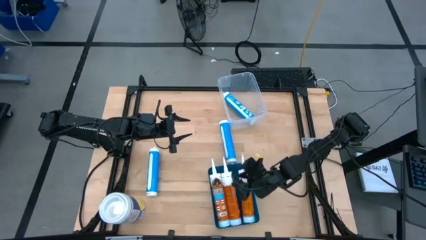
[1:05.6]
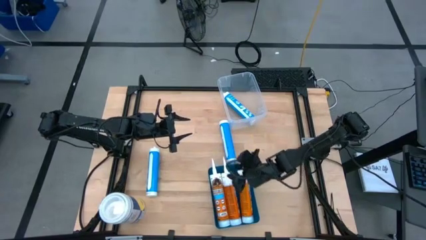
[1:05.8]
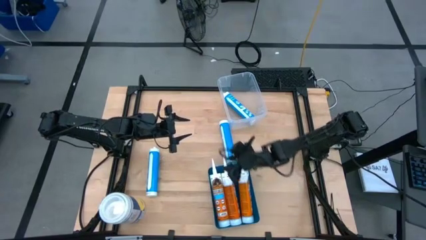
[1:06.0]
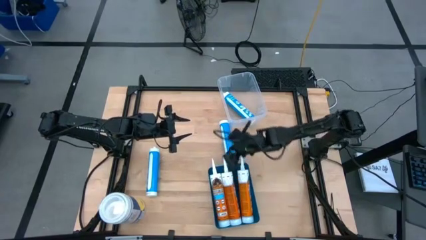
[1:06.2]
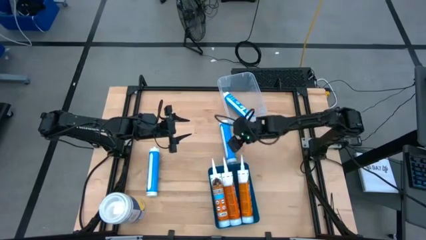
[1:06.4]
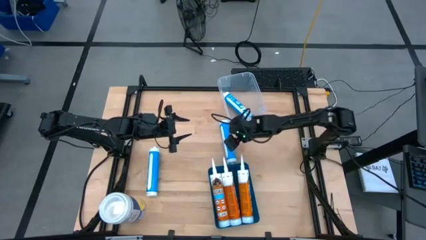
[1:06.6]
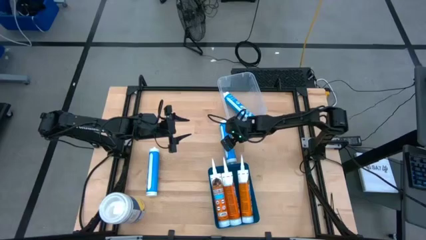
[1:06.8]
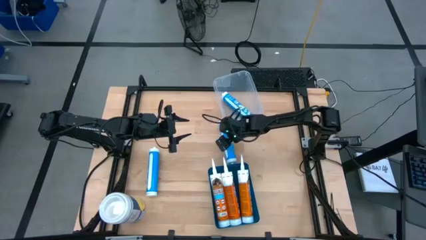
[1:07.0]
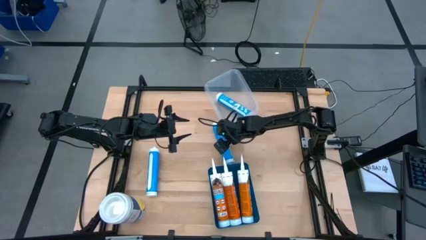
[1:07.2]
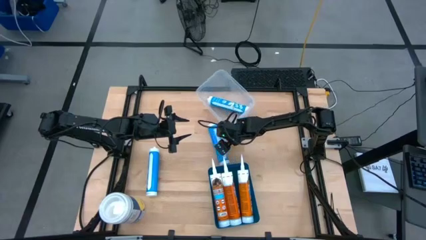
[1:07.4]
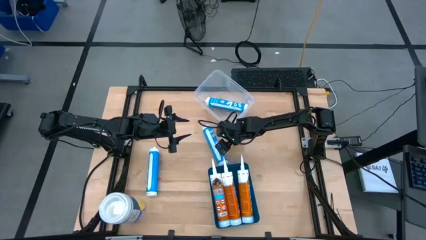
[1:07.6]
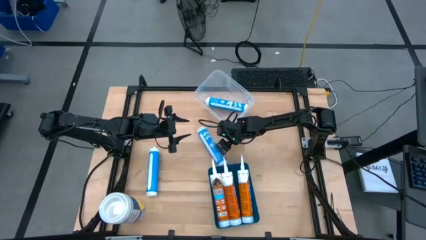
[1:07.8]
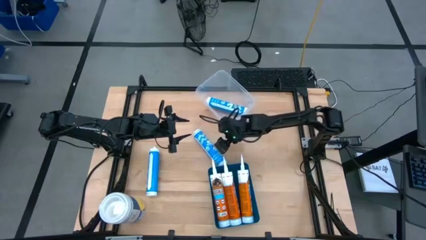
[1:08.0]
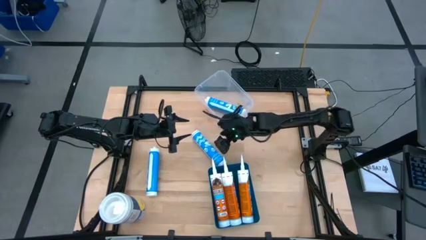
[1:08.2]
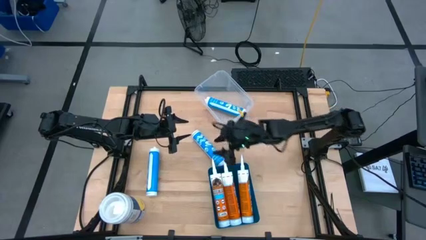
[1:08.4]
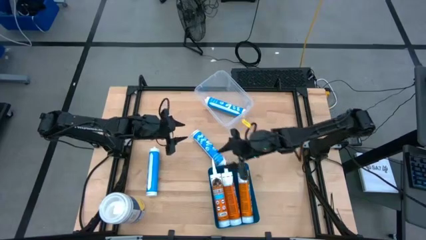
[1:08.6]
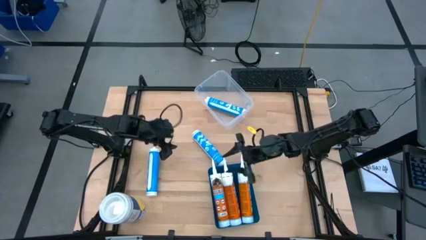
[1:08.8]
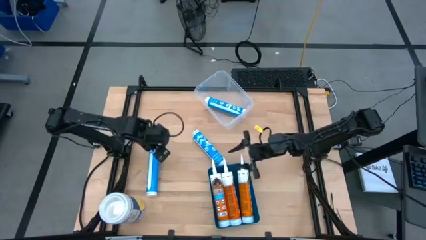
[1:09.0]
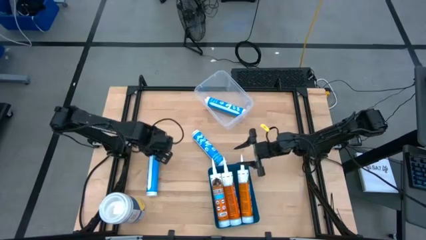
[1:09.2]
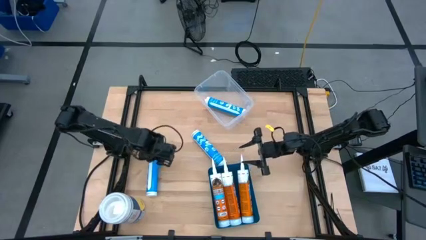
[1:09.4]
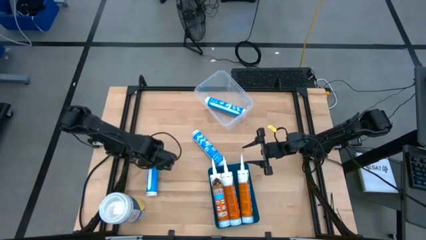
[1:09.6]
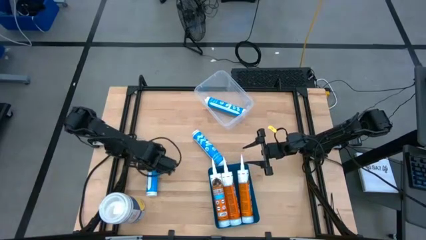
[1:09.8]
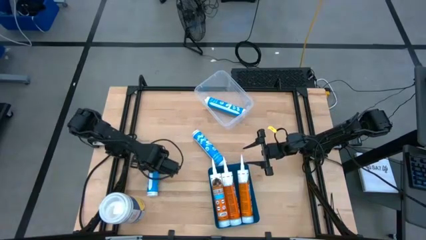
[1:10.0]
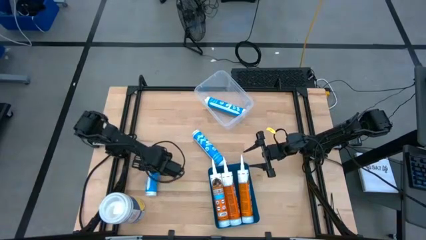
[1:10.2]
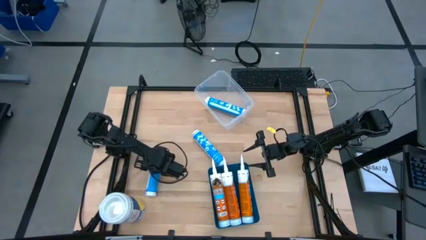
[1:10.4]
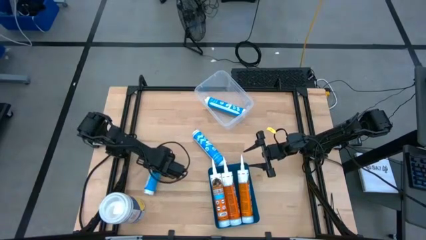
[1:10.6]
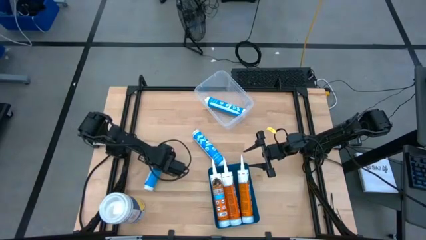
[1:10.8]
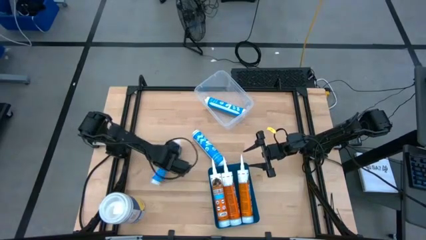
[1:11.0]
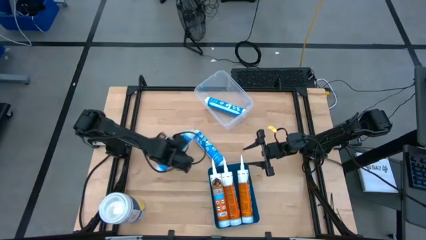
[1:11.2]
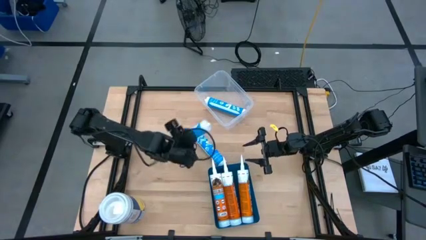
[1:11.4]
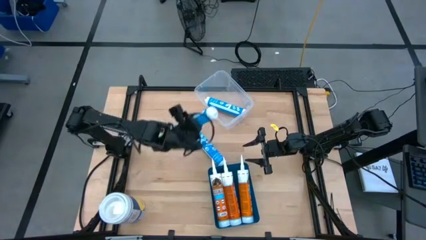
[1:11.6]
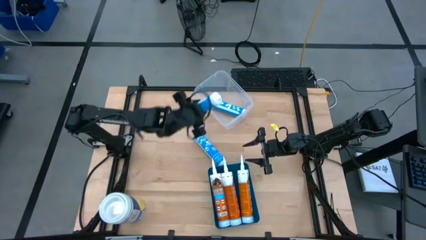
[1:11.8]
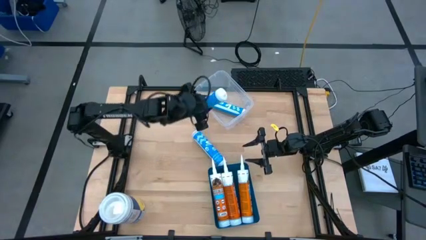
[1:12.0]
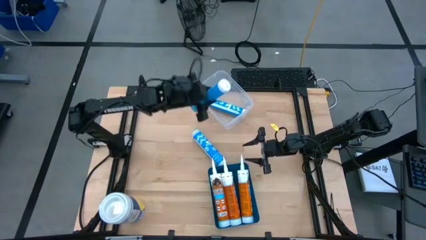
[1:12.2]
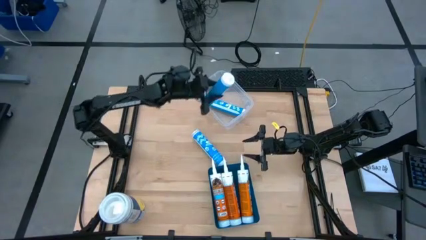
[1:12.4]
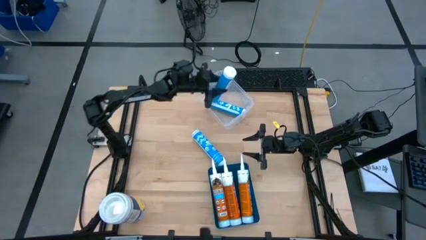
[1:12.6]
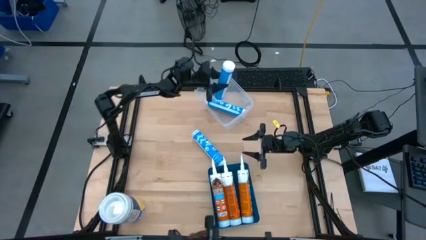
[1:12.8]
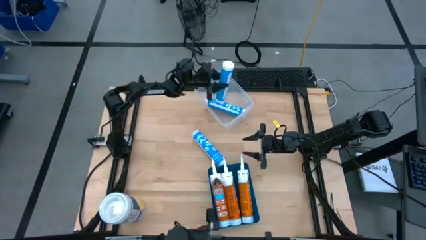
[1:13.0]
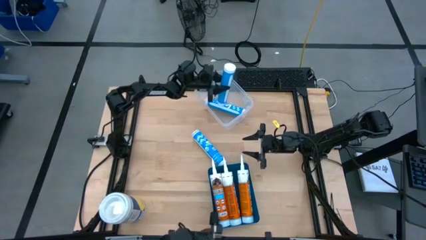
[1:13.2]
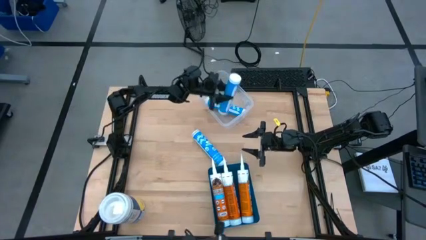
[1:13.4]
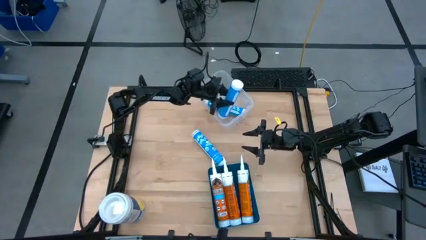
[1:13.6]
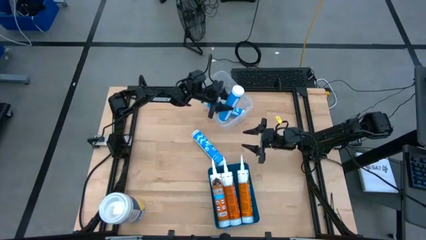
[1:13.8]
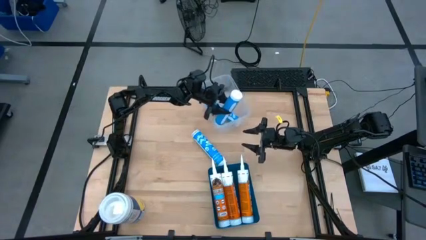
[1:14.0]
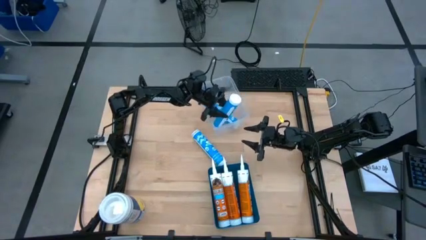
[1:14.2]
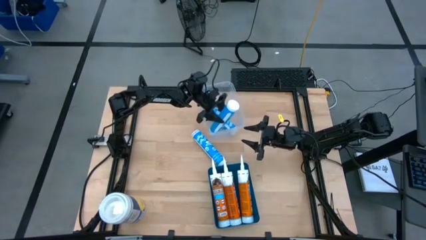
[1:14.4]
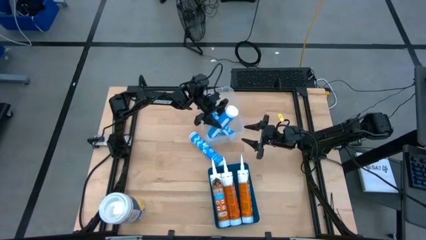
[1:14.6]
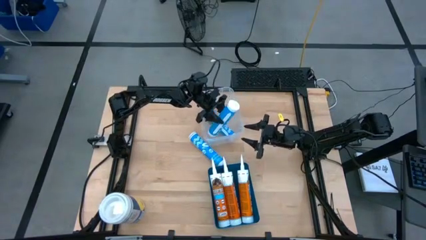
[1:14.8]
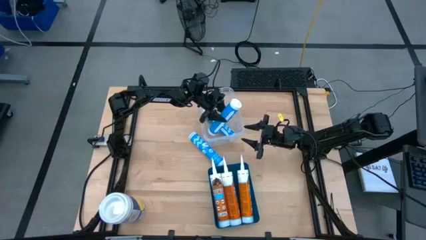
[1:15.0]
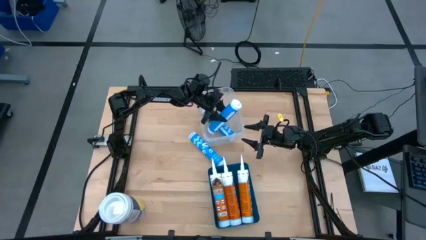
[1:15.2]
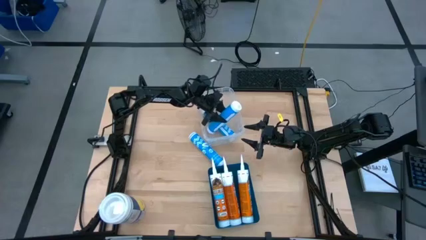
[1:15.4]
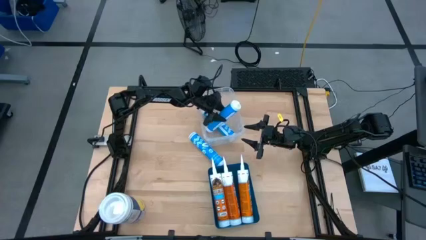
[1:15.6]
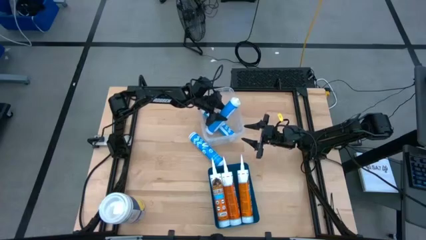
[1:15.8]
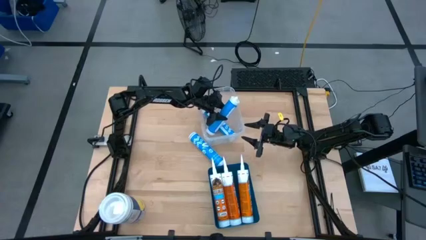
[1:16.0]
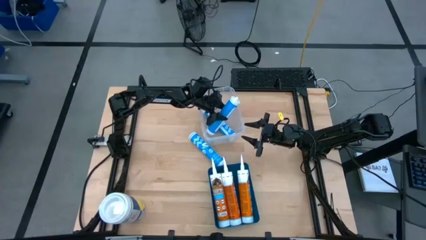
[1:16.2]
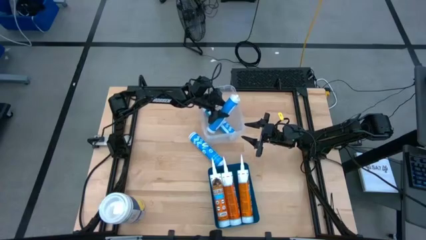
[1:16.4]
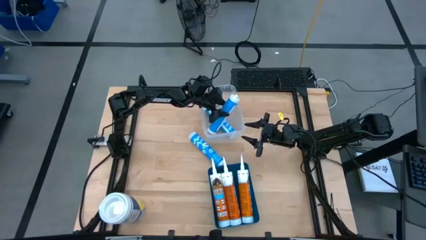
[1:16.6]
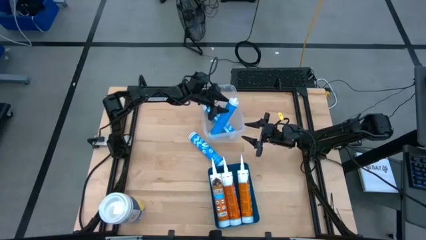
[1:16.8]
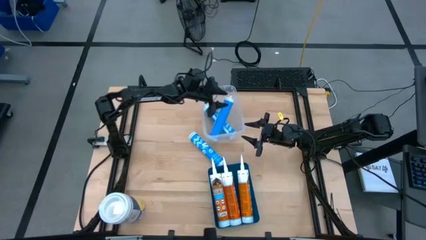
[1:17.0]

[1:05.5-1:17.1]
Task: Sort silicone sealant tubes
Put the left blue sealant into the transparent container

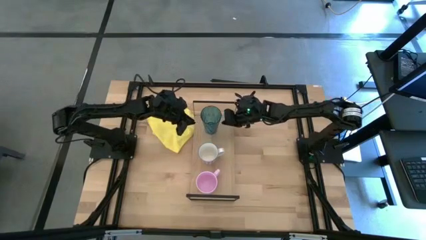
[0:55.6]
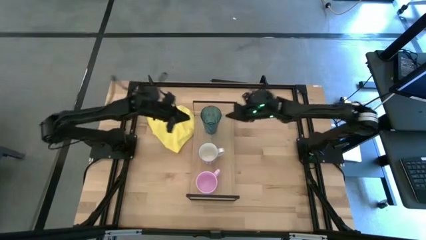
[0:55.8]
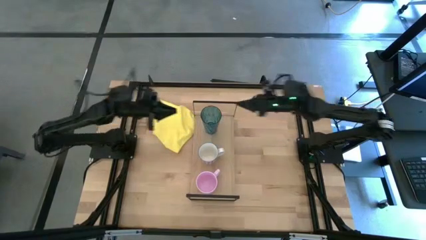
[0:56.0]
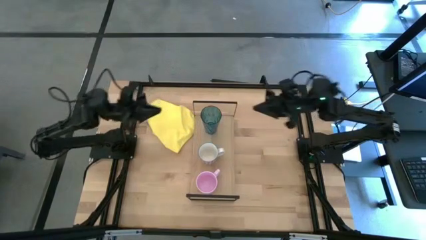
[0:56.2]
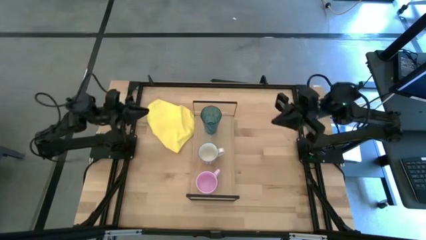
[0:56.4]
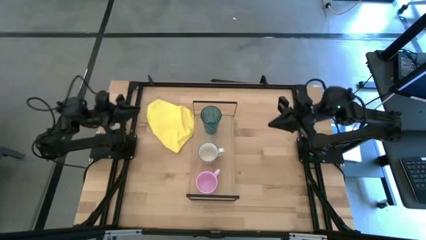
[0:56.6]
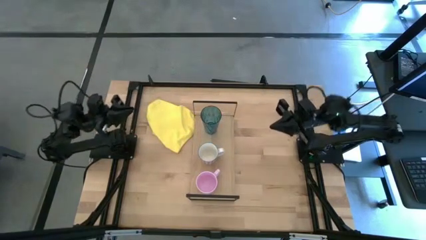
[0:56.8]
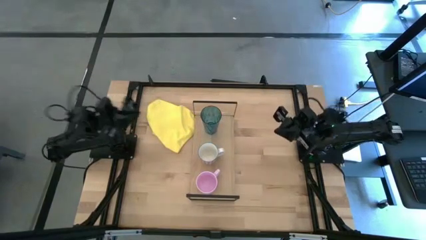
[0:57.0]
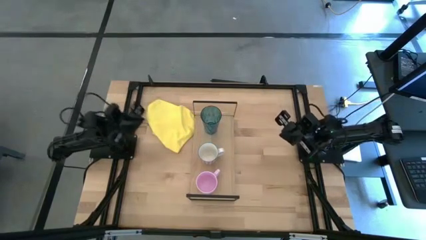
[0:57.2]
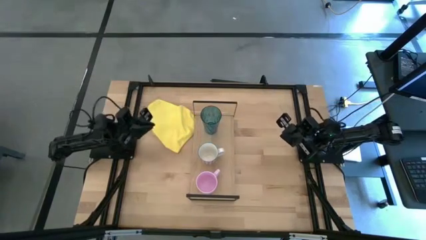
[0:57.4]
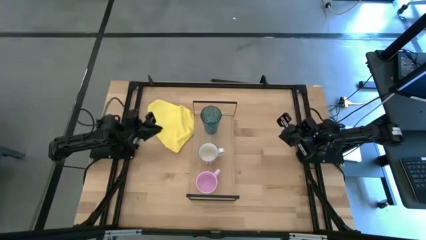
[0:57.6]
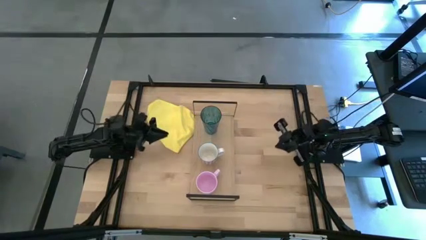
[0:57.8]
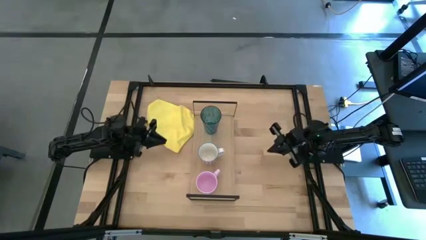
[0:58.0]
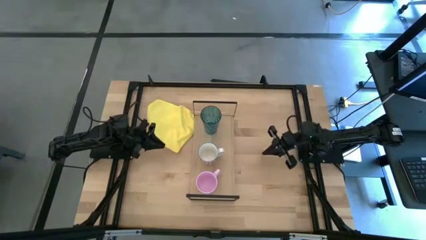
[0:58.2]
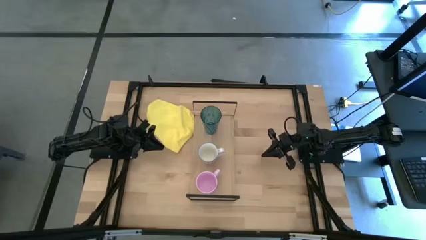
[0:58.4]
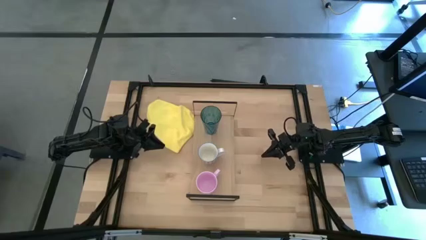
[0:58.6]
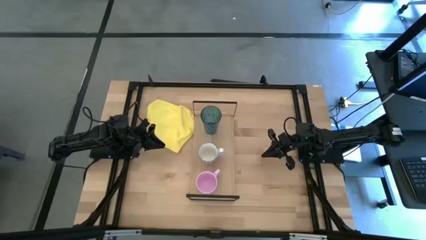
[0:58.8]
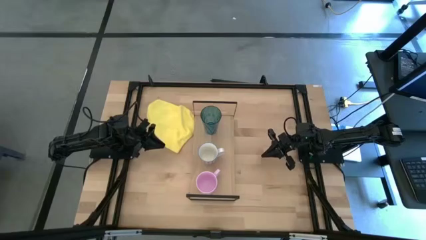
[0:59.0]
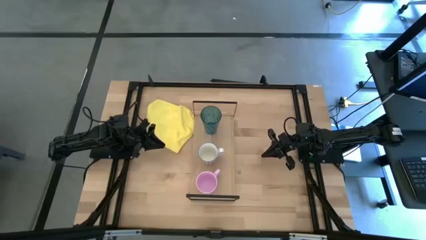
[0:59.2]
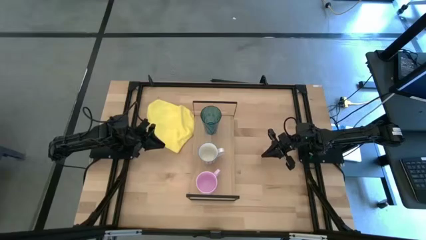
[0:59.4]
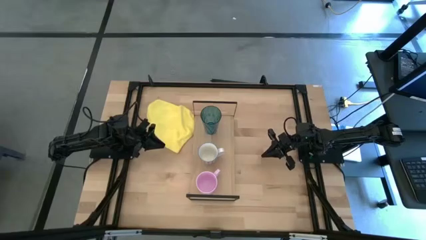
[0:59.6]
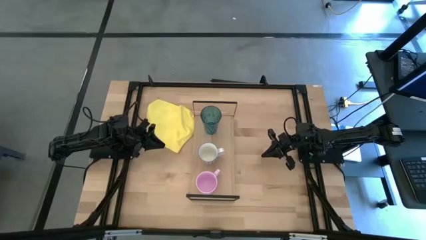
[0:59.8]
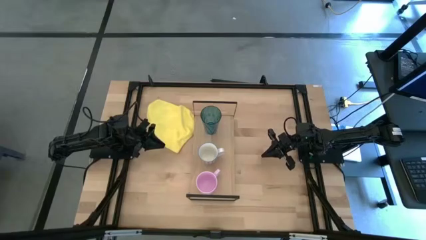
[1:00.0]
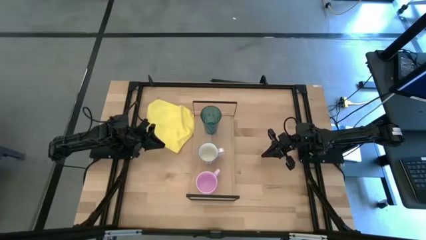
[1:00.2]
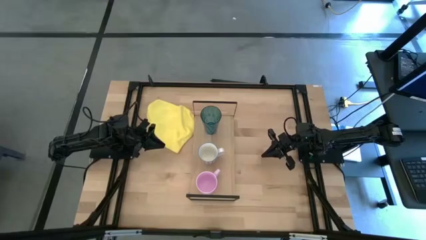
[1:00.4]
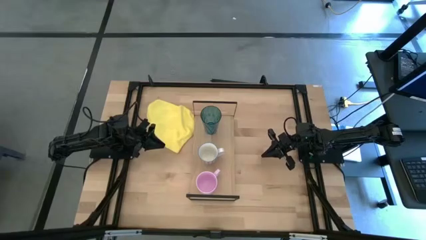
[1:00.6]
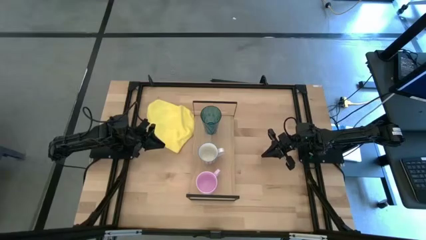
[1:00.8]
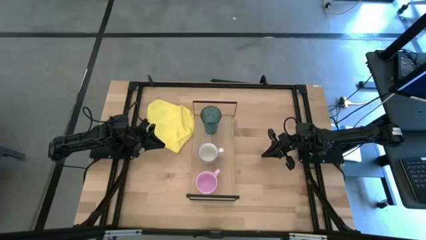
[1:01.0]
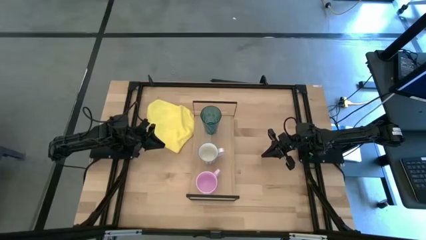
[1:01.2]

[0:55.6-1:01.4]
Task: Stack small to large cups/mugs on shelf
Return to Home Position
